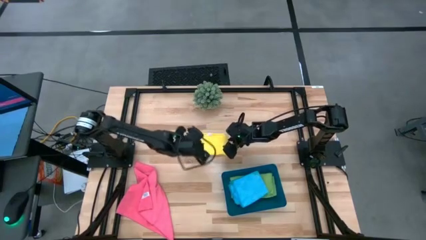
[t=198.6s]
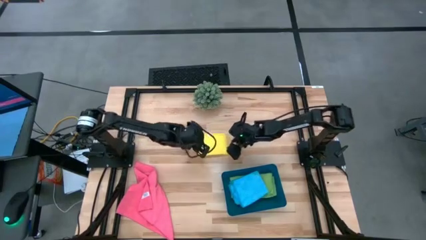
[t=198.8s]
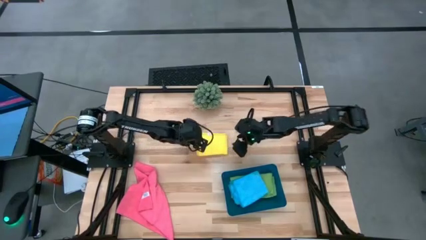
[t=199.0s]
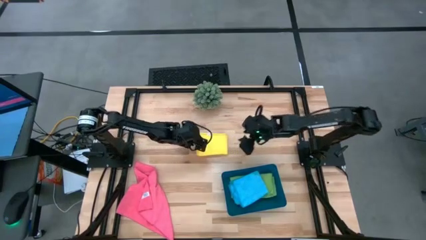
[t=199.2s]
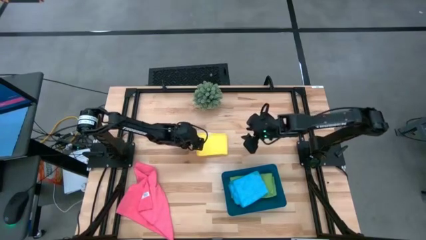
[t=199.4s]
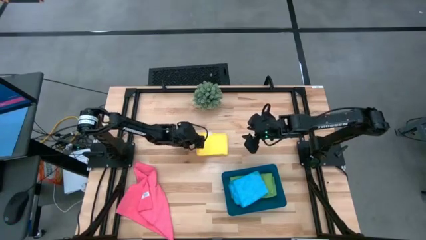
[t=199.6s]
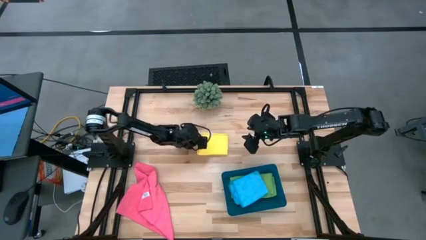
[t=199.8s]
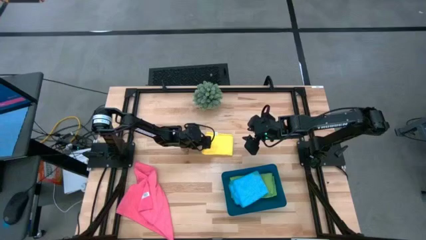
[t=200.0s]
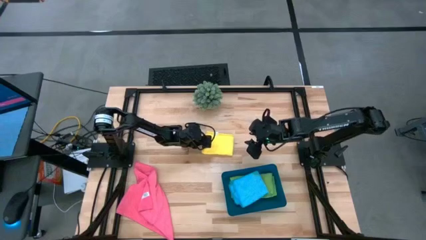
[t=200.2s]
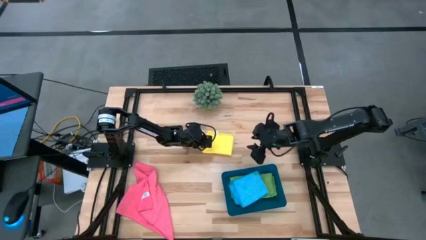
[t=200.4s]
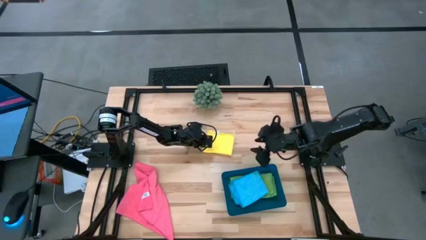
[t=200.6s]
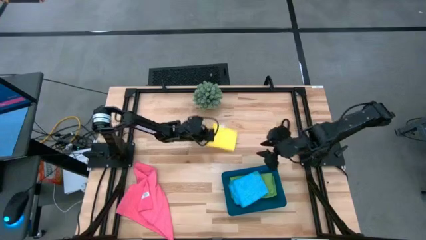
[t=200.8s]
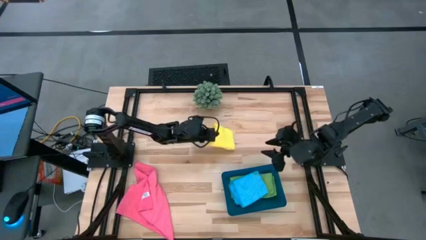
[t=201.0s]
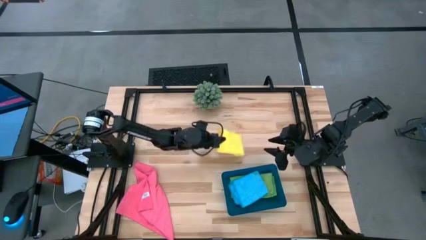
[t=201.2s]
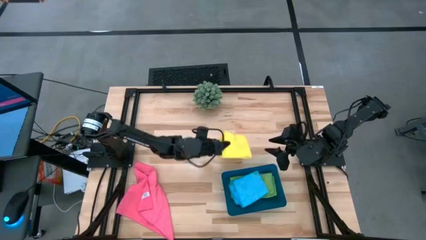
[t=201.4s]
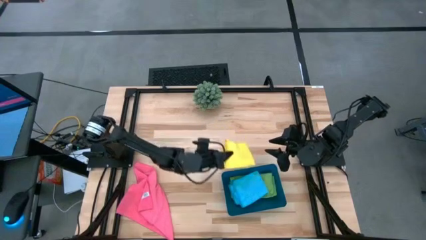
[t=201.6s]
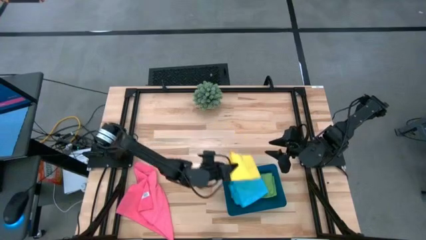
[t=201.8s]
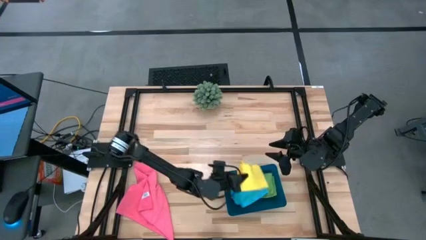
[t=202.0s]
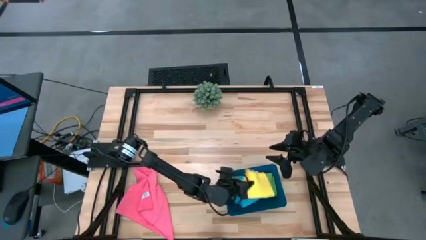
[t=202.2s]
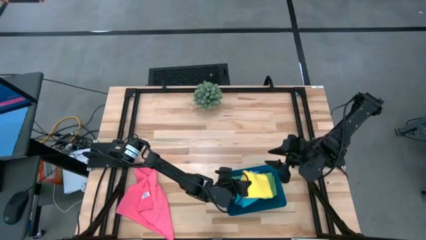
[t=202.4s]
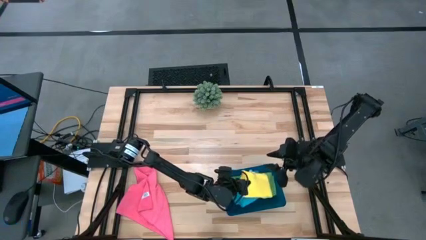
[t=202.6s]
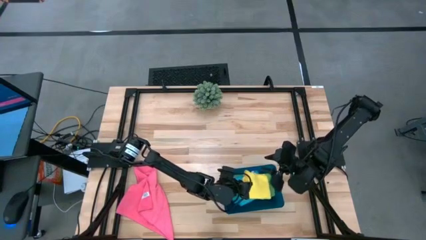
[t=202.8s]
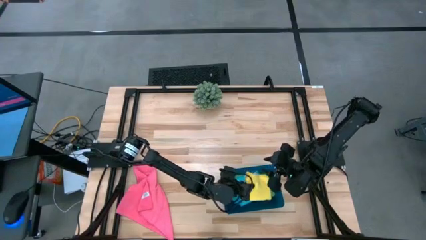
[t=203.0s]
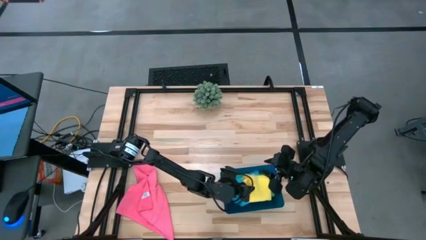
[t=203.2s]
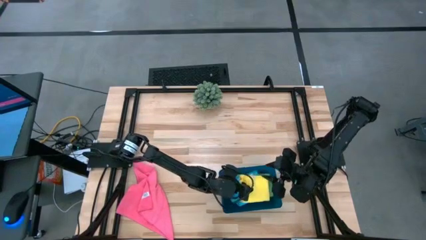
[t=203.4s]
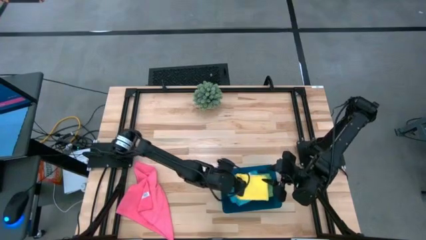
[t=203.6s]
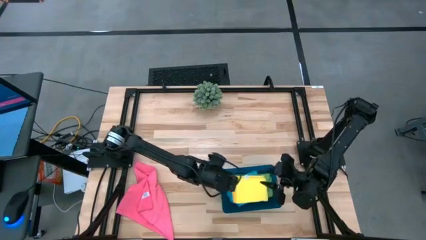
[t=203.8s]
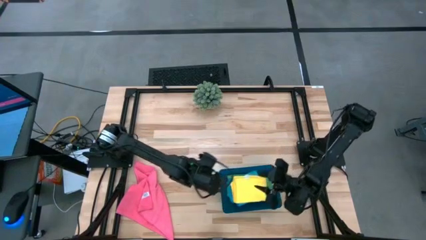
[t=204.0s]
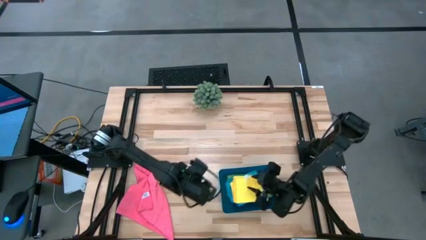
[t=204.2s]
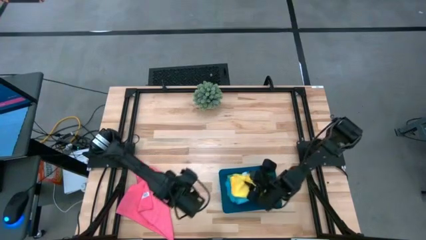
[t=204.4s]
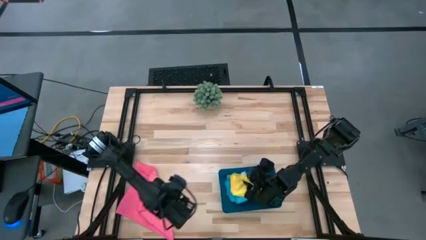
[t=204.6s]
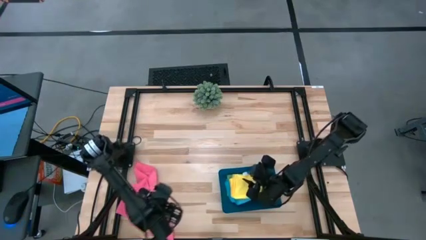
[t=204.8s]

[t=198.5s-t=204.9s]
Task: Fold microfiber towels
Stack the folded yellow microfiber cloth into the blue bin

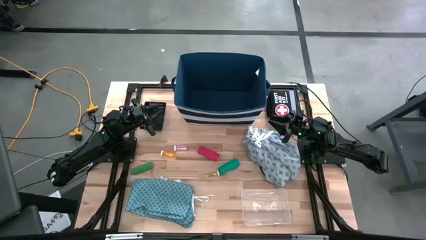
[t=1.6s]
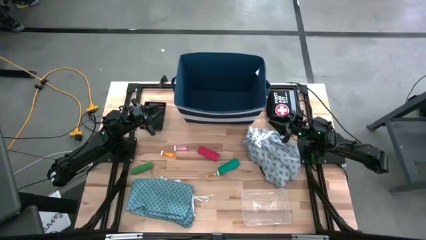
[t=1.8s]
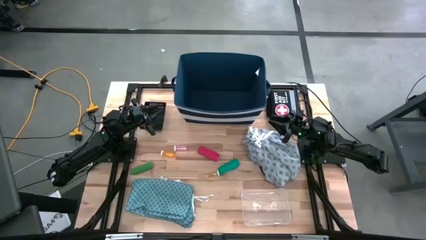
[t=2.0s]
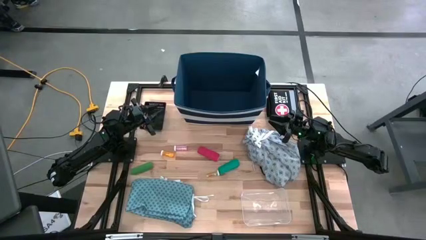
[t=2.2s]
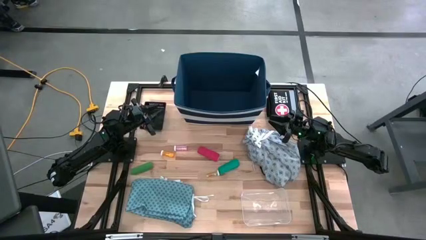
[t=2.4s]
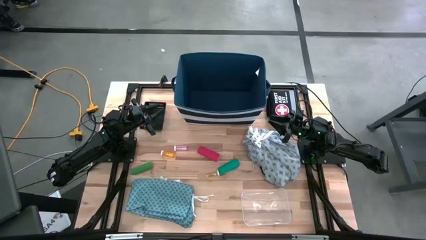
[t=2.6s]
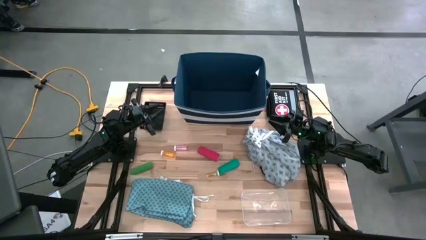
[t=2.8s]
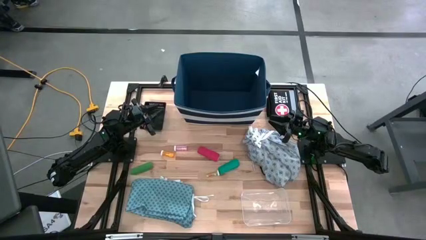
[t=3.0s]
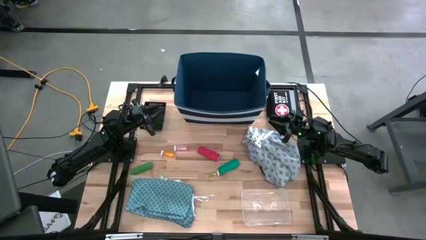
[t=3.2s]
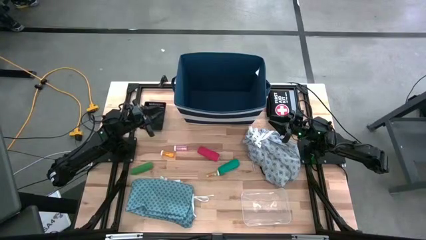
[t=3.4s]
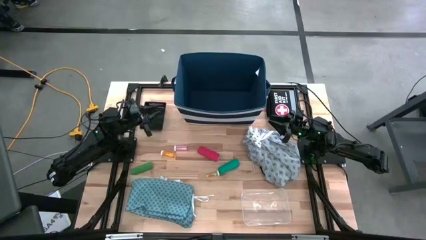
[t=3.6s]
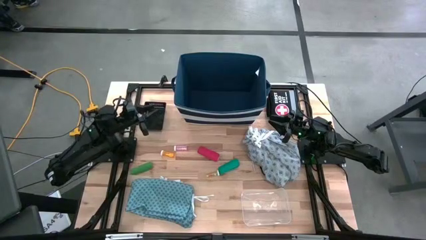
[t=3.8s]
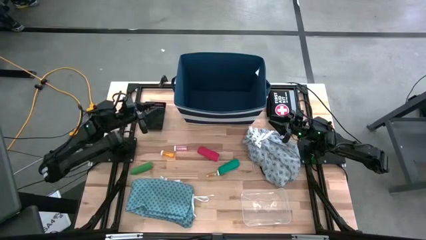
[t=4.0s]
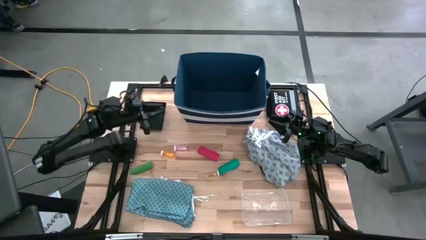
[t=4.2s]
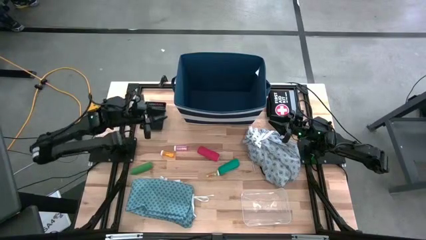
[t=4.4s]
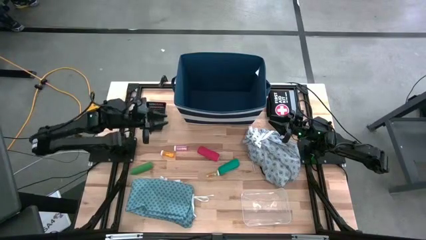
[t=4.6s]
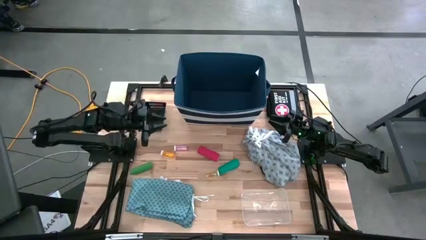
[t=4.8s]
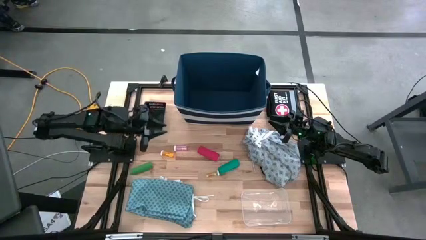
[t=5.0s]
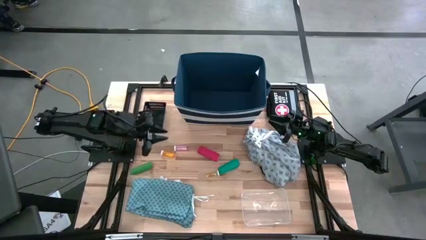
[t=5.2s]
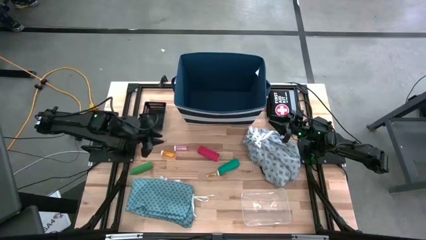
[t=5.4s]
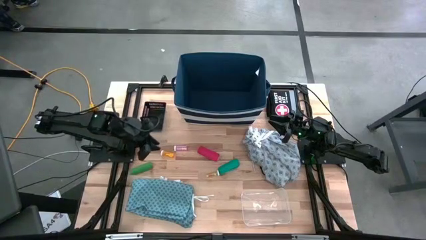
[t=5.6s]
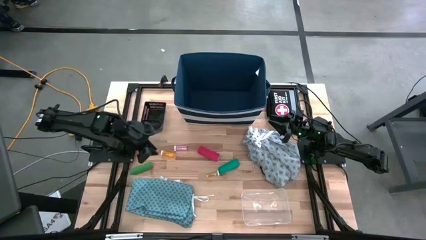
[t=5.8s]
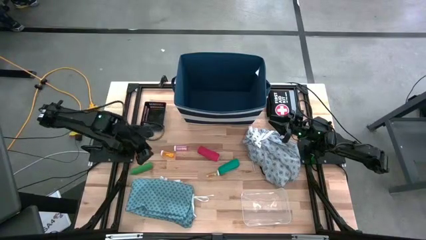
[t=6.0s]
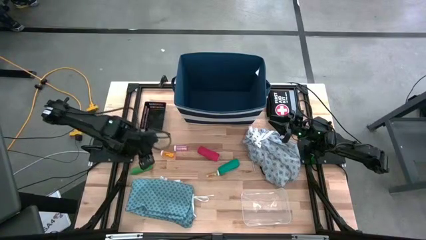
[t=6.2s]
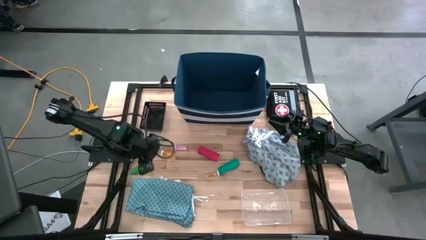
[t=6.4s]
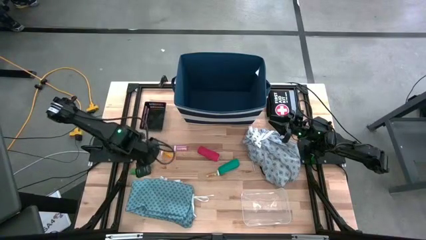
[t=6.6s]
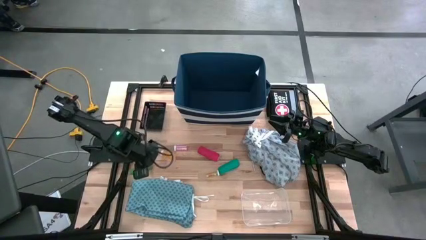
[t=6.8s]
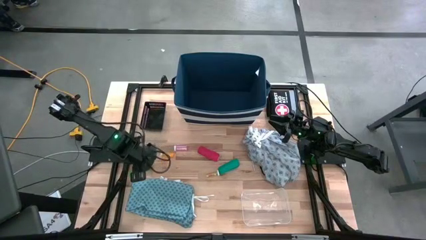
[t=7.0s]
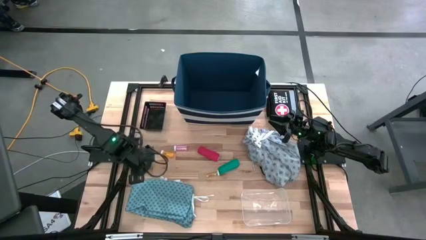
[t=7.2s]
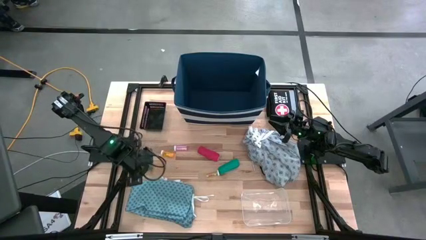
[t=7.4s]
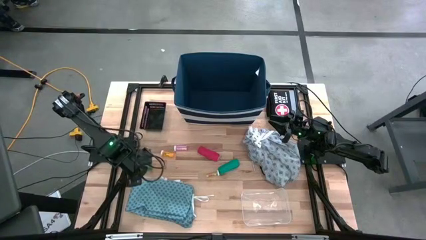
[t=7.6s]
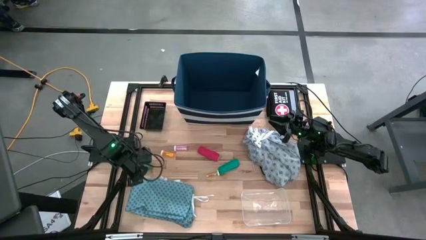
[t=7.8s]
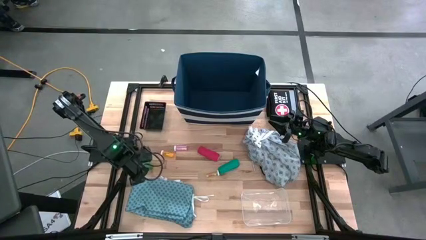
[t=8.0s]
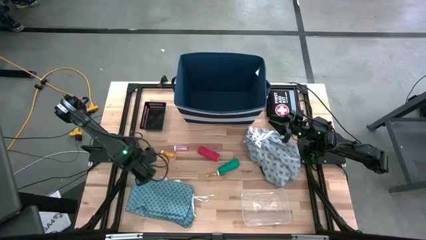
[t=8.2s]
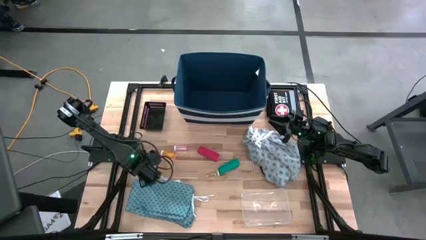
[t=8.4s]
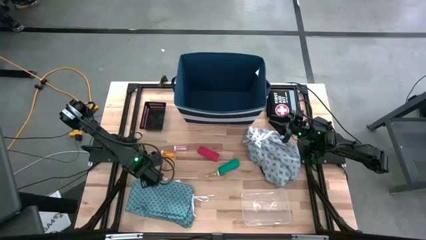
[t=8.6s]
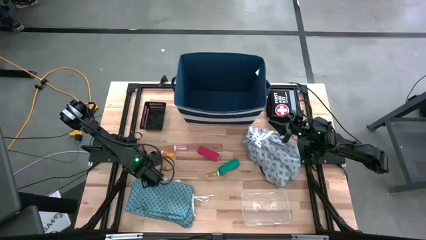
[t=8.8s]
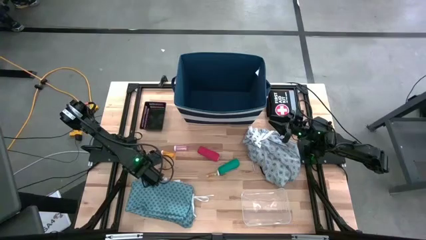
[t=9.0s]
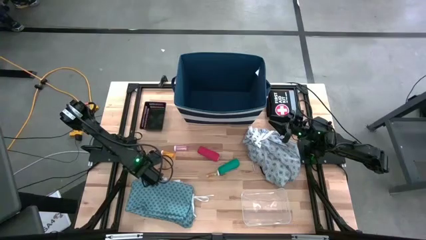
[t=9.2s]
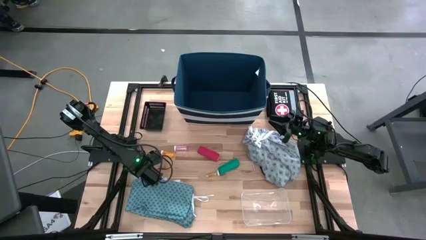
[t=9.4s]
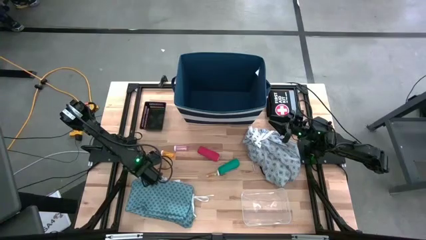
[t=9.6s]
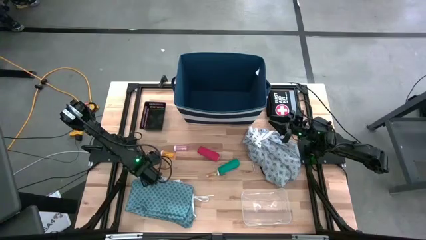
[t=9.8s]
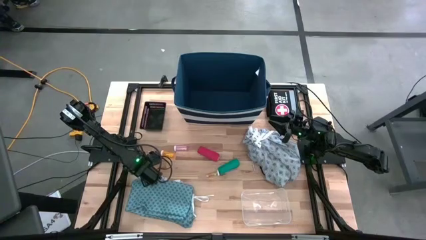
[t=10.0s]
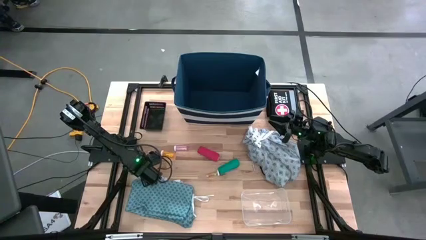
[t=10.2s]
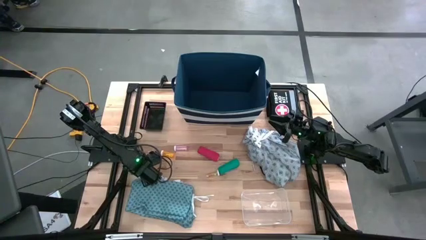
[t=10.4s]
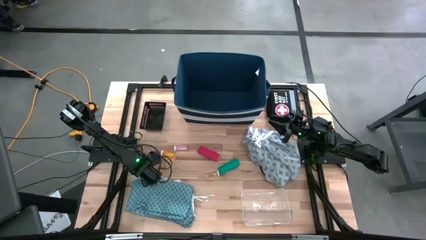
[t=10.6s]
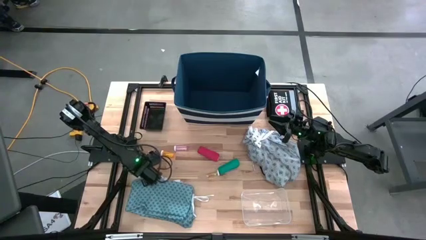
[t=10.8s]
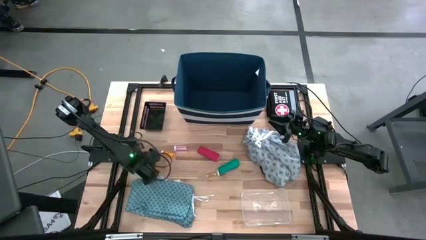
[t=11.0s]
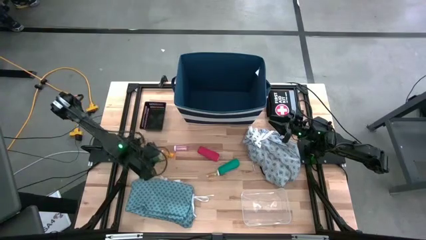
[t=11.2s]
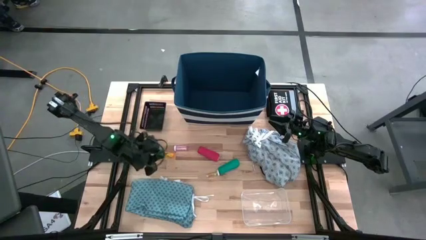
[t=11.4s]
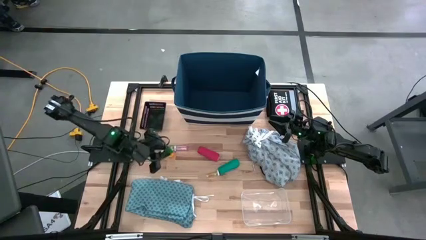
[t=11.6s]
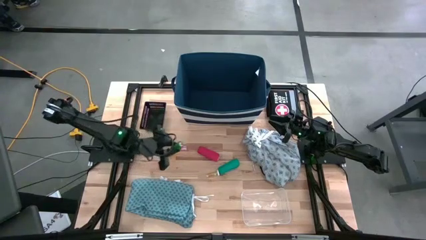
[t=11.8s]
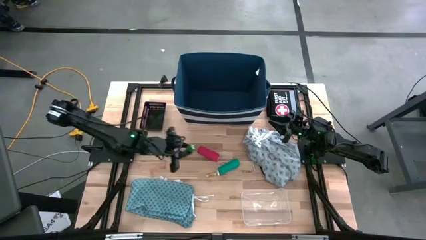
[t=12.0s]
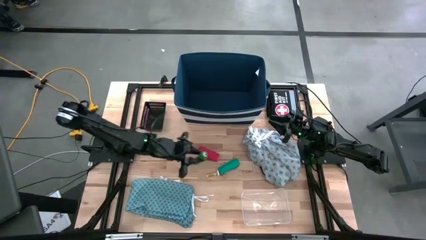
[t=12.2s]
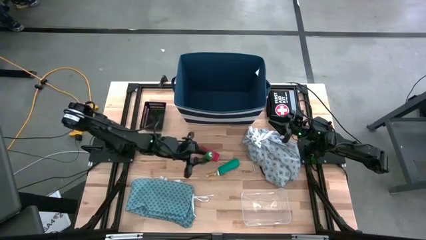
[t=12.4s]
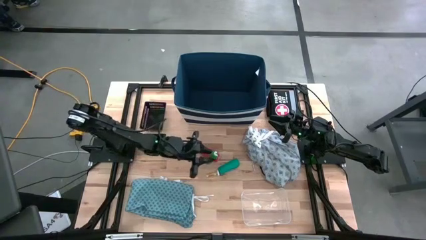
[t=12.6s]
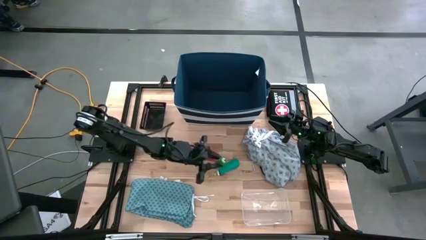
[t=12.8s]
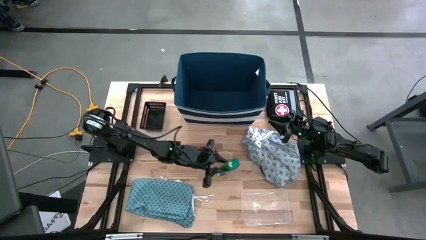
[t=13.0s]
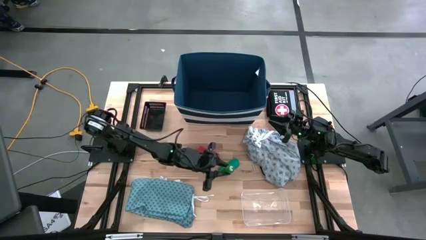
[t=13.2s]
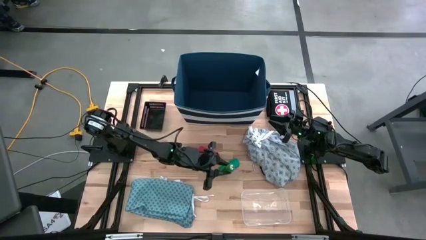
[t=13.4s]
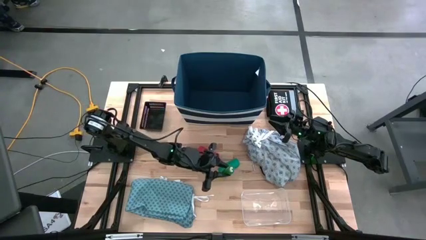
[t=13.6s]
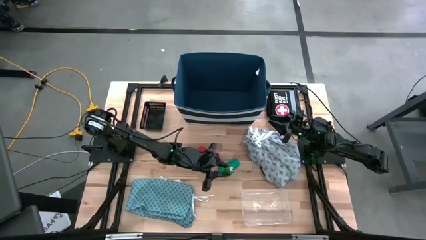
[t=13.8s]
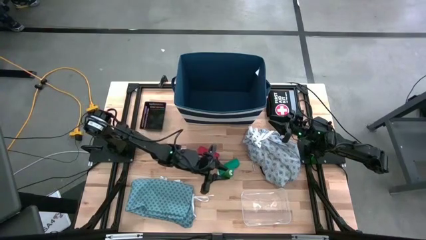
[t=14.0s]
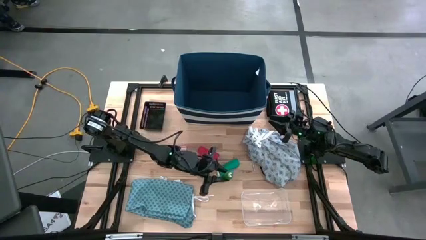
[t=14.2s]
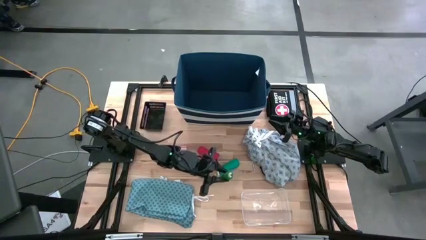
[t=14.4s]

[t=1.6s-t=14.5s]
Task: Pick & Place Medicine items
Put the green bandage into the transparent bin
